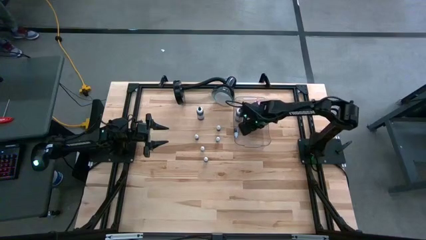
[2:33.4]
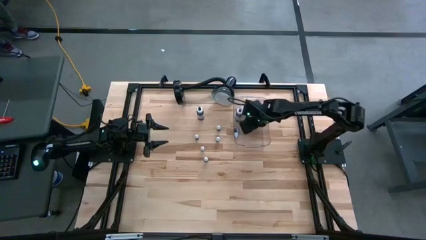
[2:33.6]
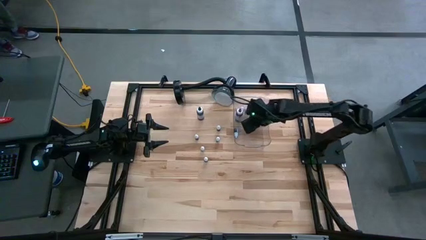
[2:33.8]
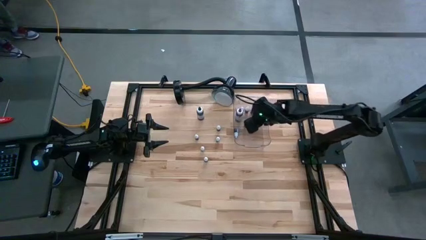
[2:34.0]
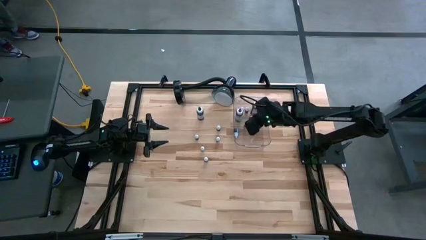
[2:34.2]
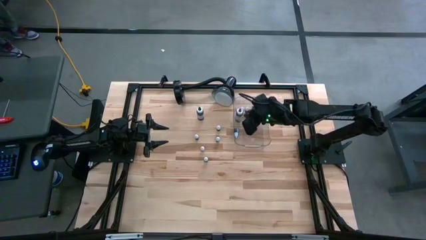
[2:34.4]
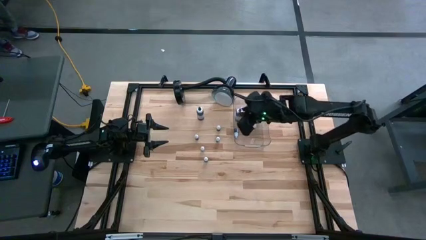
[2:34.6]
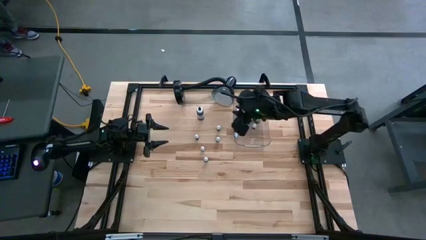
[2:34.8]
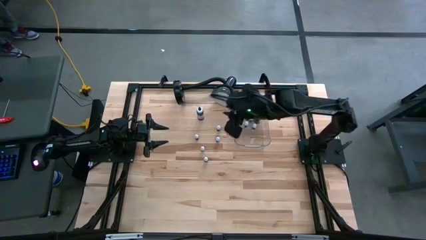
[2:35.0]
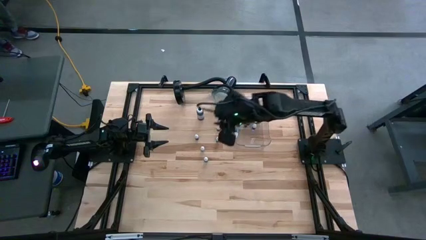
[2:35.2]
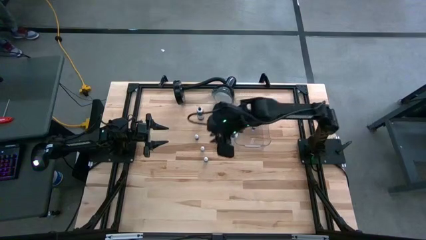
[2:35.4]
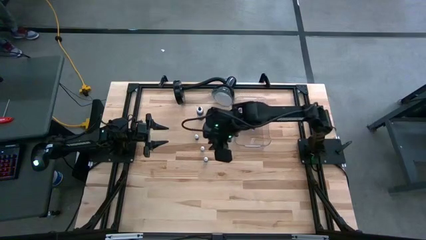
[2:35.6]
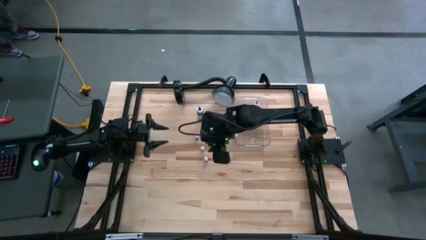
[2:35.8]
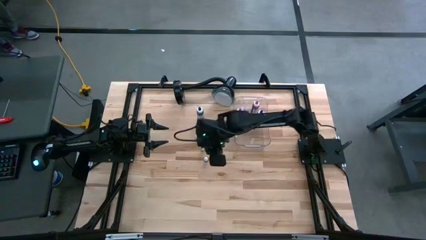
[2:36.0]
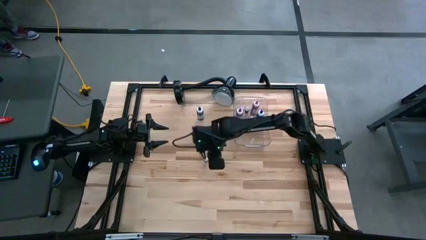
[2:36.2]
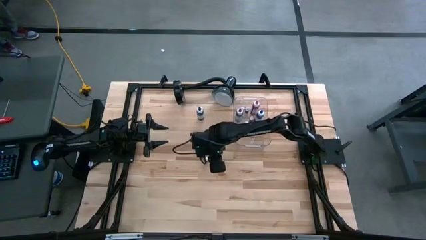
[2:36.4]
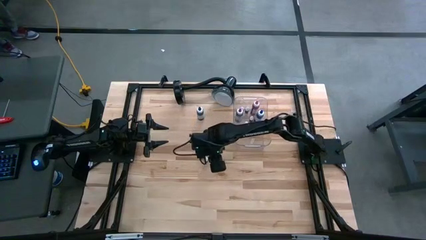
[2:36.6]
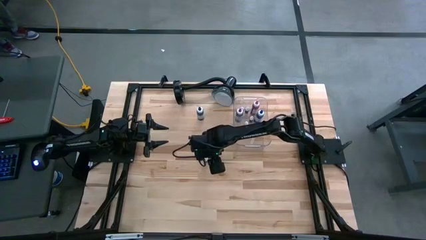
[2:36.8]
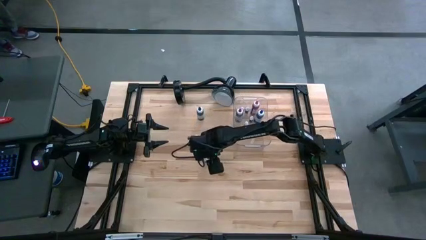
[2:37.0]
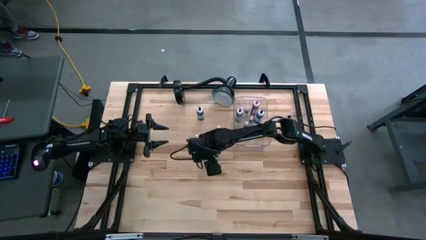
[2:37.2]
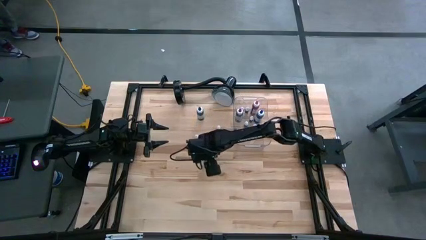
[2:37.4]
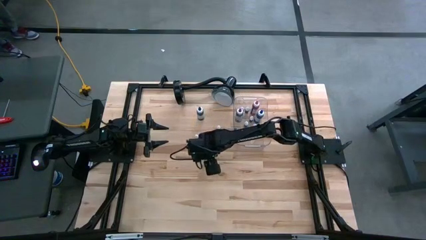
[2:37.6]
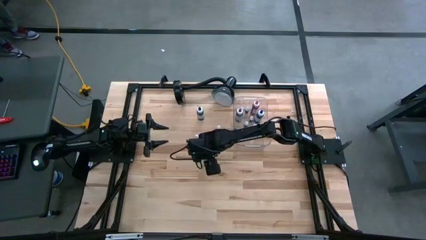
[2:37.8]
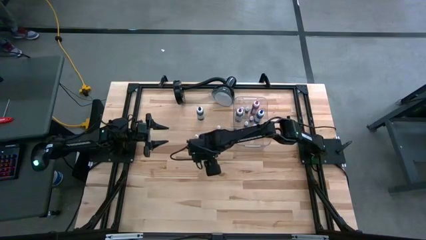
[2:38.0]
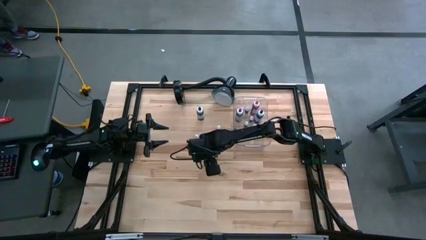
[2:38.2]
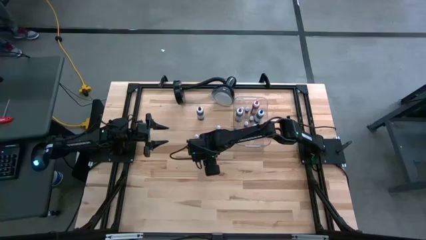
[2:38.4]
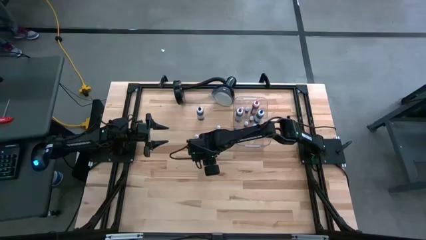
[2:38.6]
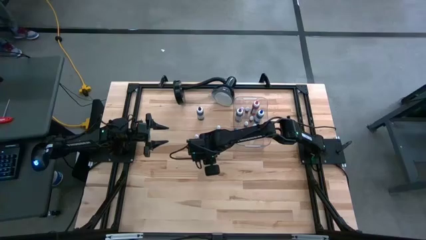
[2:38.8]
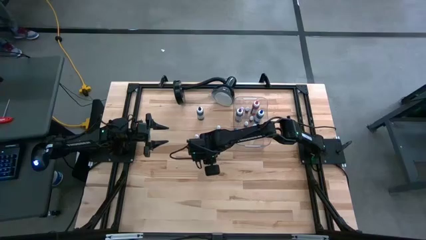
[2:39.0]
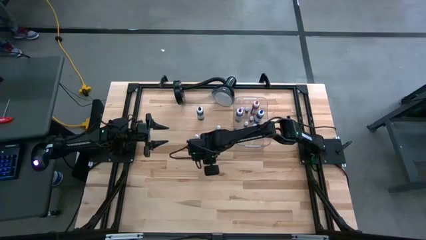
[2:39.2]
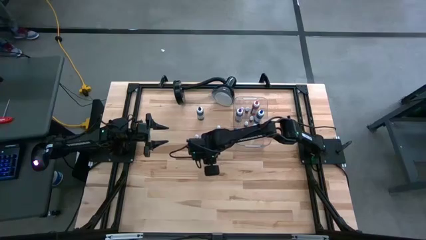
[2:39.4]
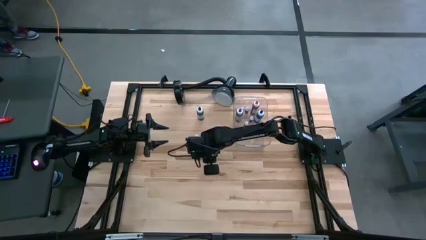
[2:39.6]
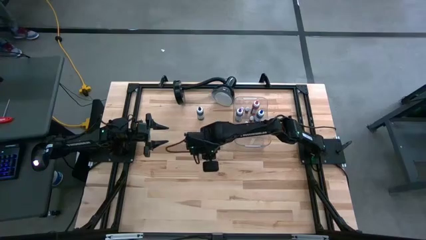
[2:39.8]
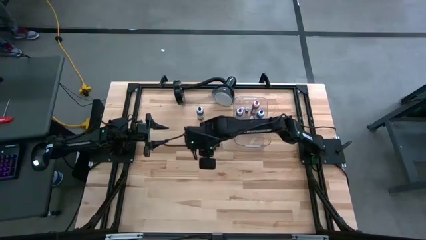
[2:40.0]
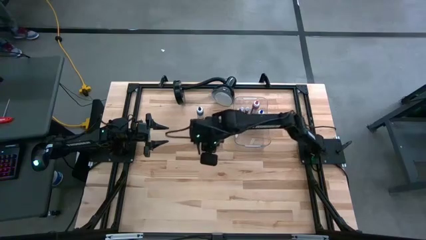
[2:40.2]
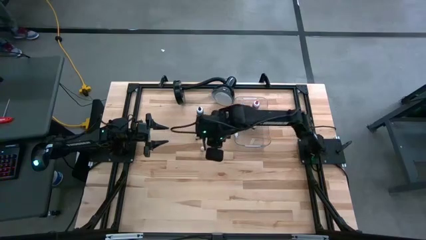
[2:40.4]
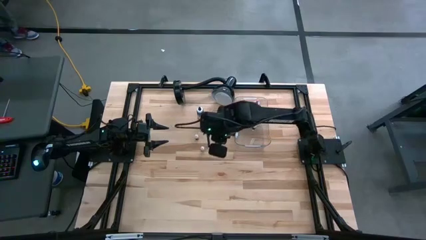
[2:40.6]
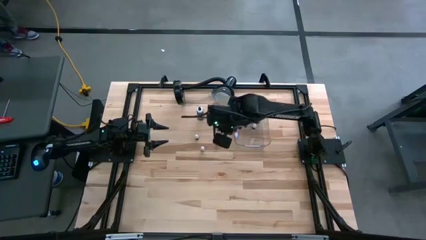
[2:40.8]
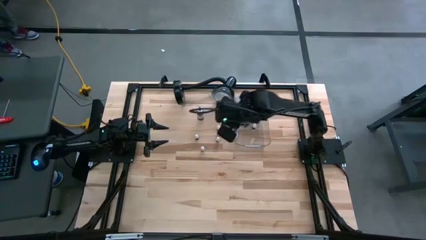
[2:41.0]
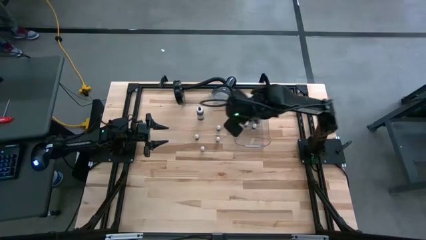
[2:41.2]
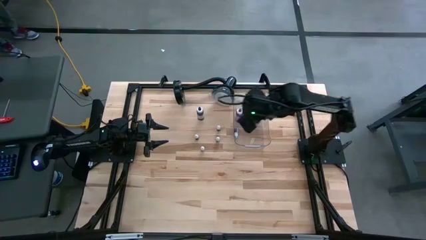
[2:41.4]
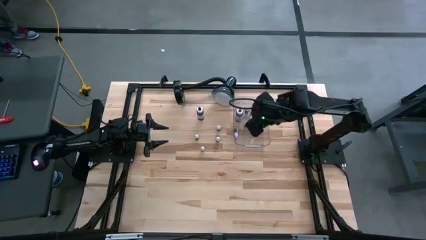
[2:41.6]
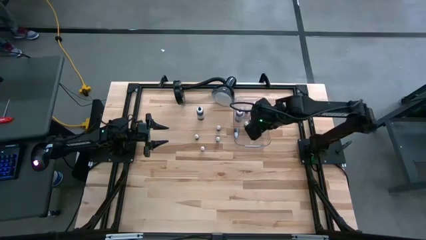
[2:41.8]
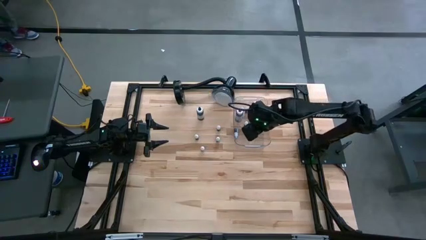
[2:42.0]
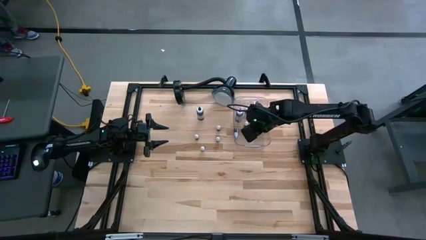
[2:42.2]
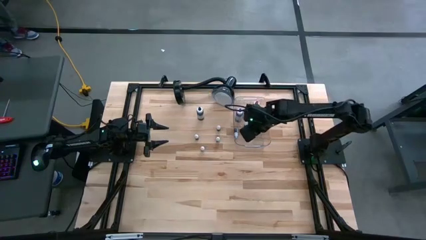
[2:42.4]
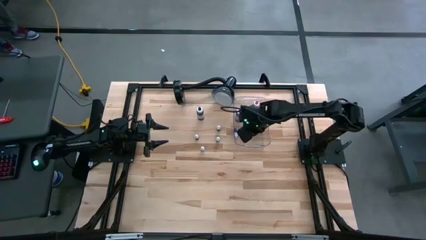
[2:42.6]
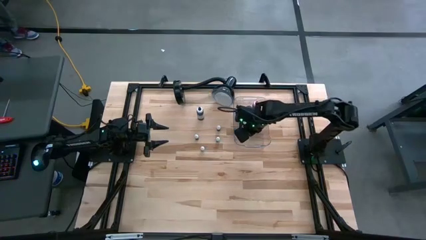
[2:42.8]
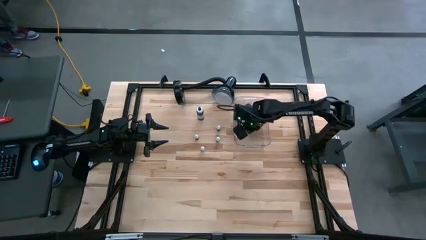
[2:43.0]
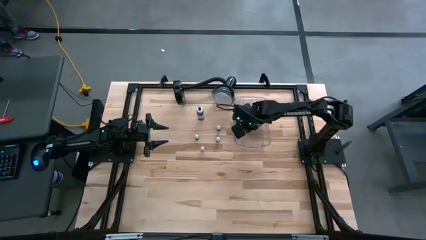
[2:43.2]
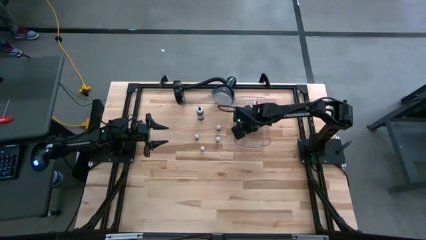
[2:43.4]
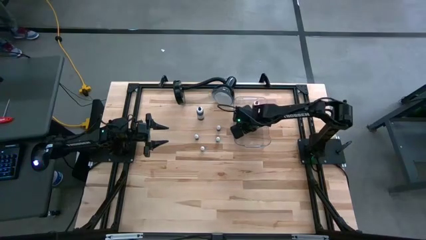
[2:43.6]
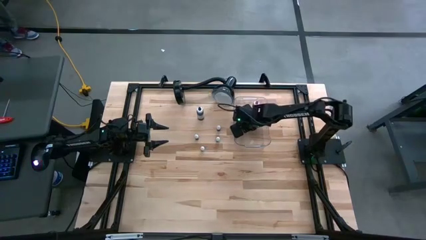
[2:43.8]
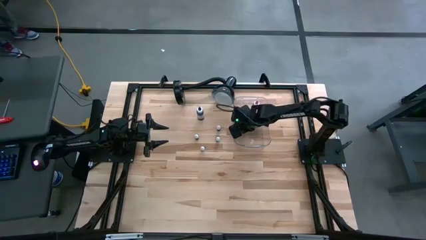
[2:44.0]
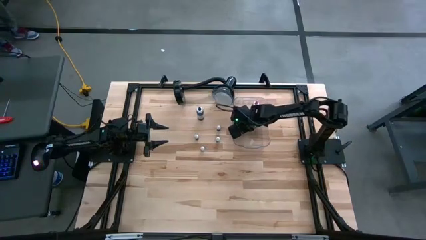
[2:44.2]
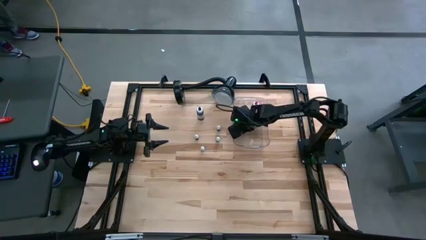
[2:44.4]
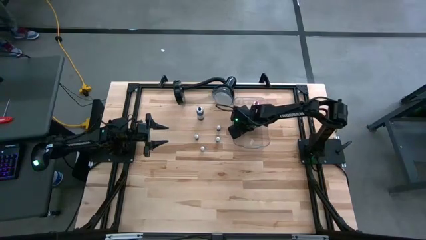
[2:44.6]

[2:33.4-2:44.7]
Task: Pick & Place food coloring
Put the small green food coloring bottle into the transparent bin

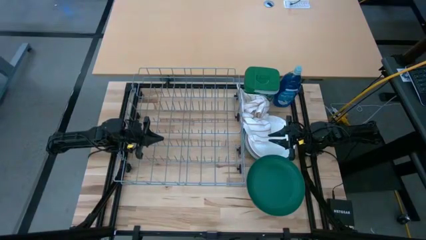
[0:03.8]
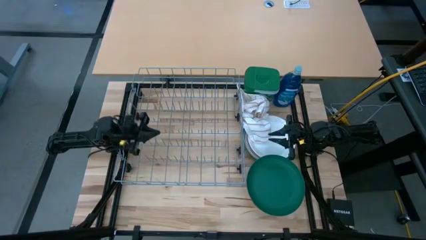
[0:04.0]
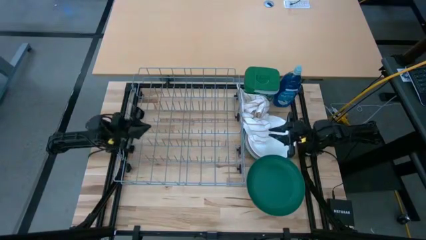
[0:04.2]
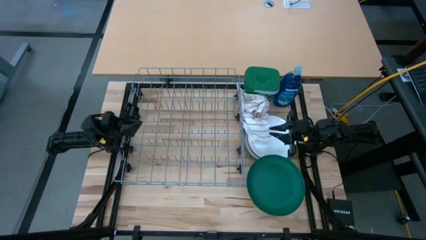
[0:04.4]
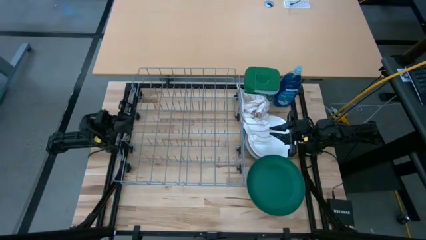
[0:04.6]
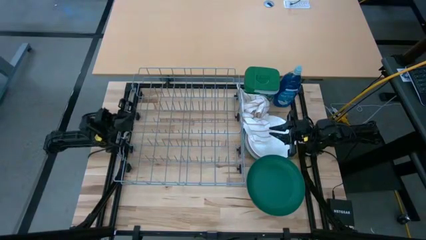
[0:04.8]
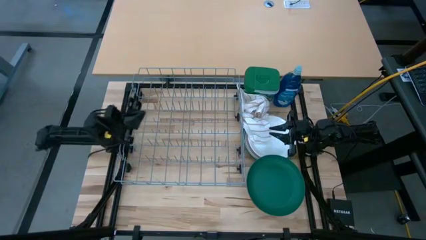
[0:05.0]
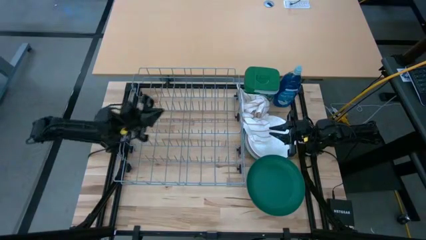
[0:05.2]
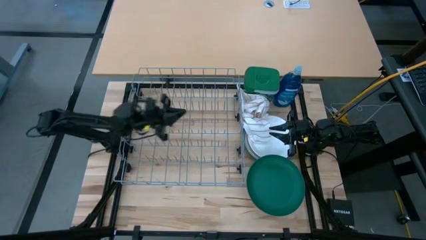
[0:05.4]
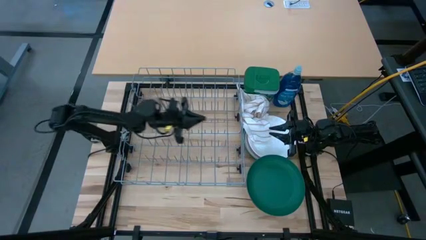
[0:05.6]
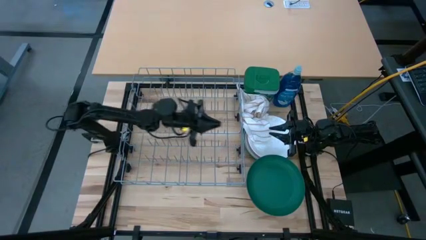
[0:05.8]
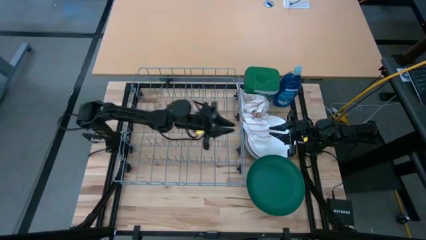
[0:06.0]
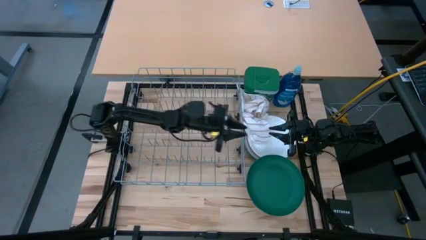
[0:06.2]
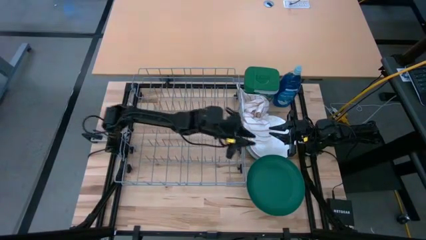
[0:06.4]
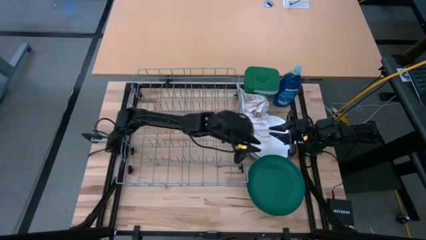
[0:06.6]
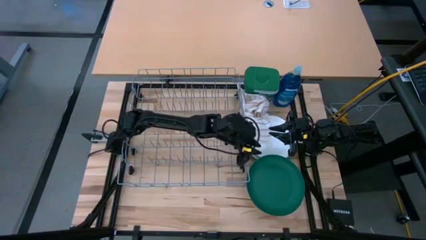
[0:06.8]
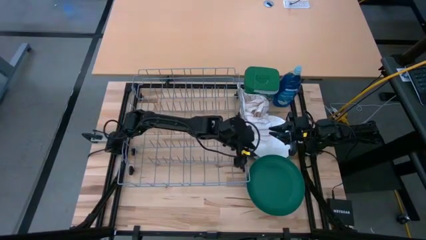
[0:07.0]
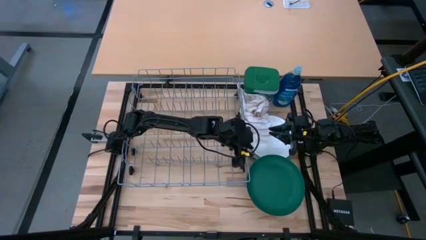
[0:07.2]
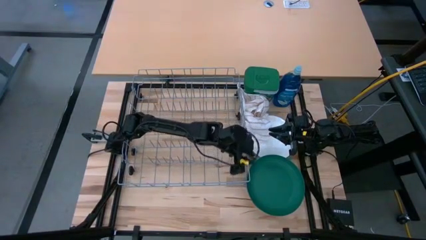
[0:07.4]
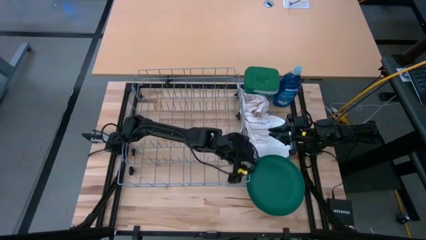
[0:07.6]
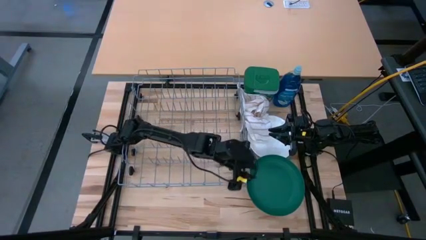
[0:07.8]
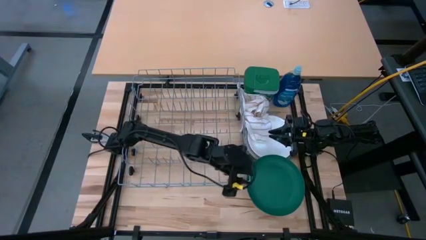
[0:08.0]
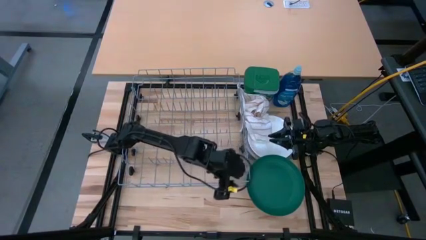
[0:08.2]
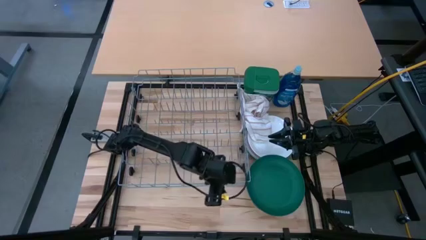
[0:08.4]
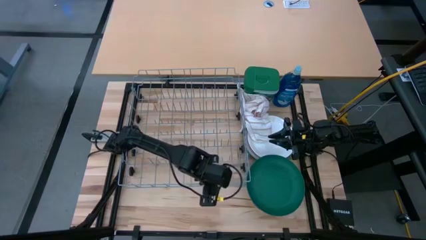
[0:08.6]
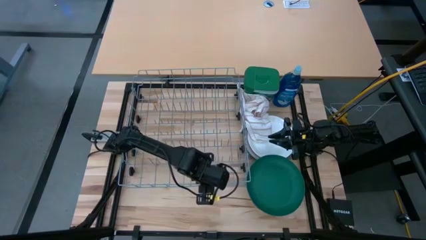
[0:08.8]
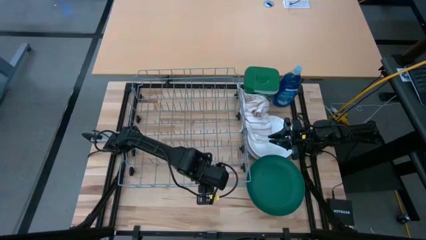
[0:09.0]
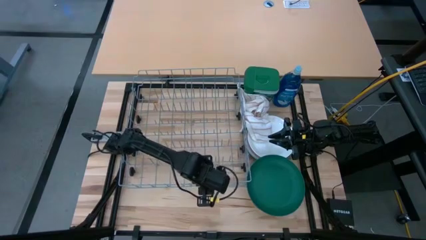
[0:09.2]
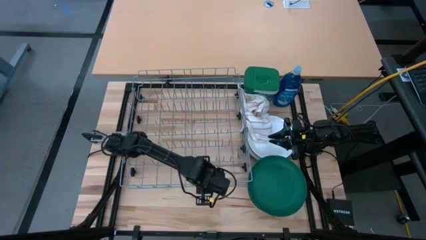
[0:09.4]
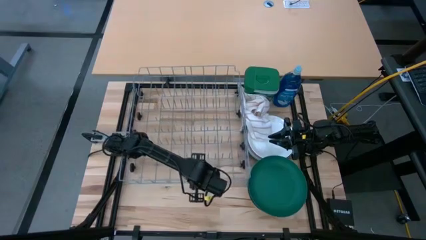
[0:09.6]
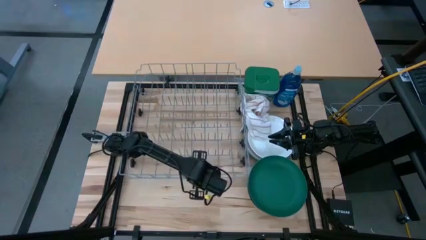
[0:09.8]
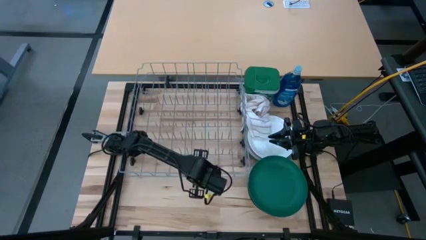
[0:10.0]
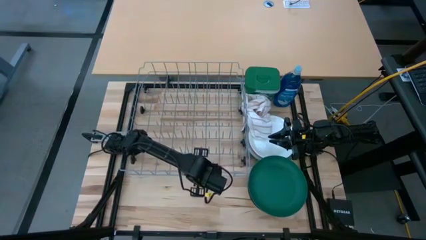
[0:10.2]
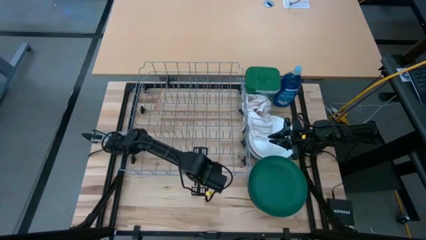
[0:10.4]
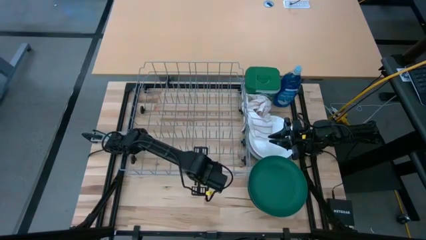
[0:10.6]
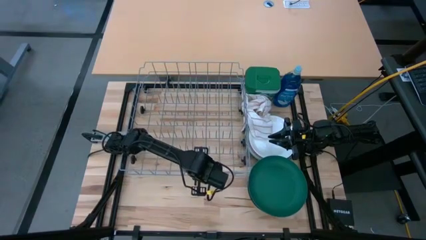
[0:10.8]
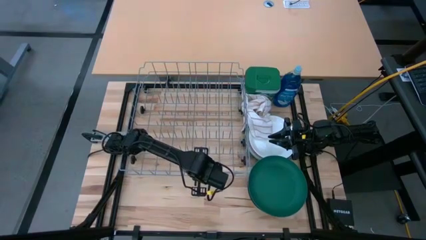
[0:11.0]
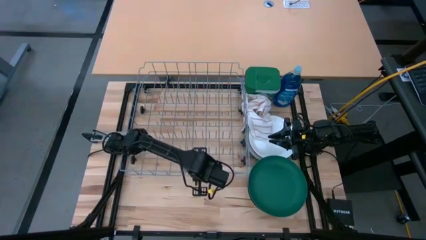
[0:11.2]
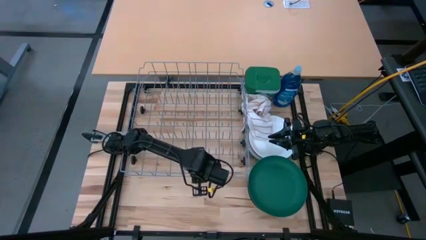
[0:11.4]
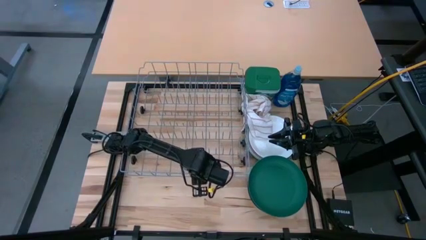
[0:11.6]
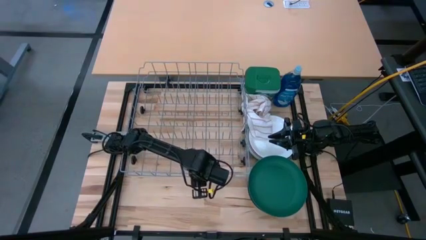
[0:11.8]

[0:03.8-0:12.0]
Task: Sort dishes
Prepare the dish rack
